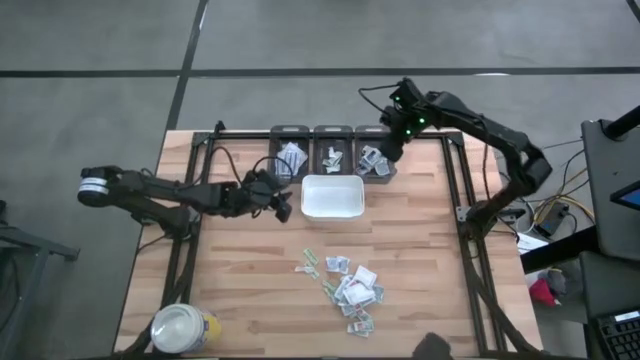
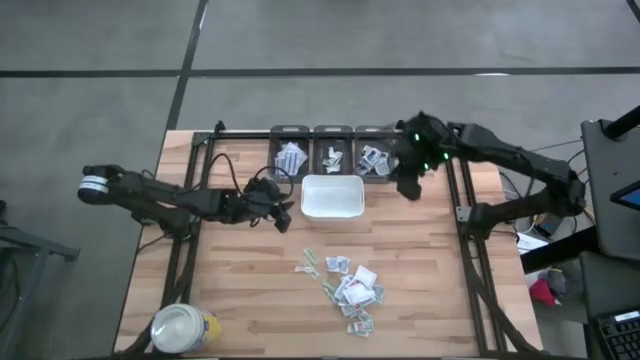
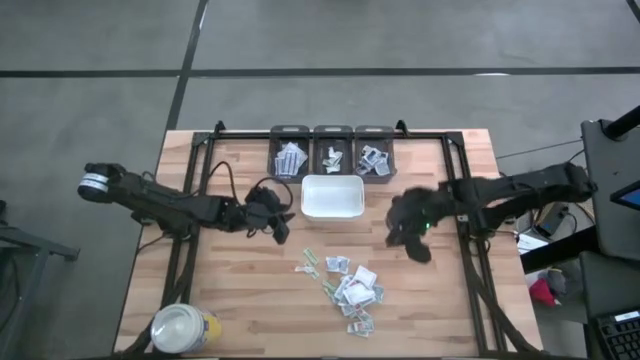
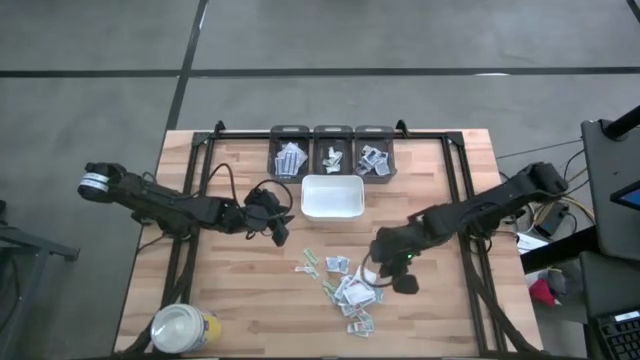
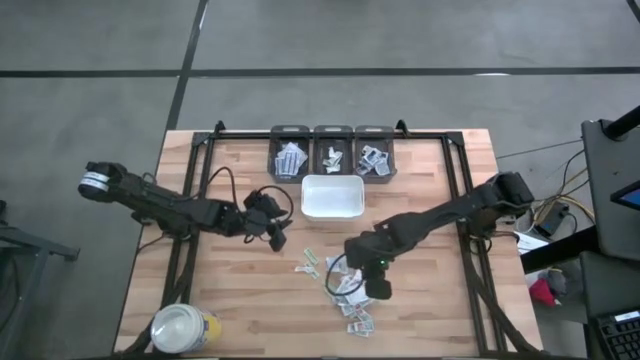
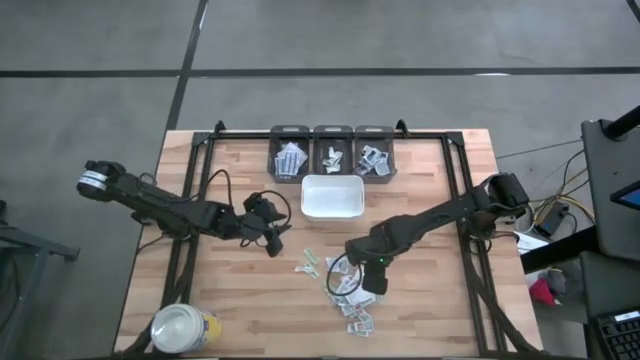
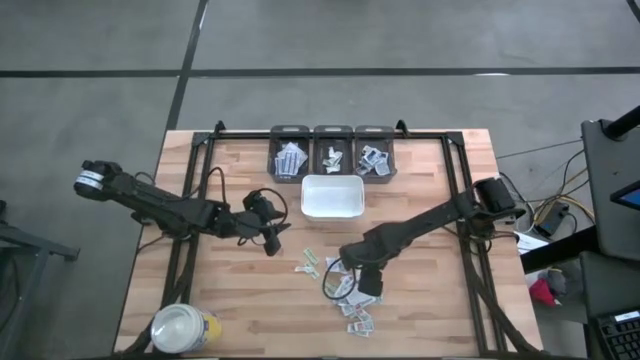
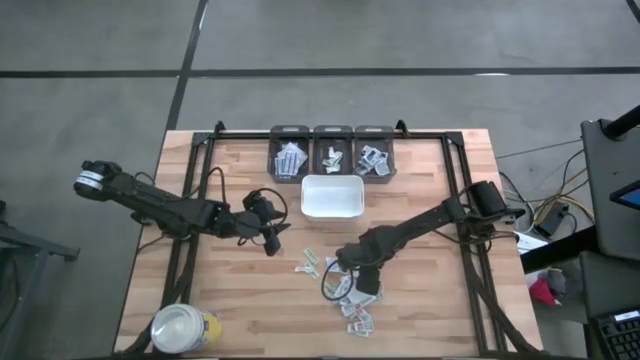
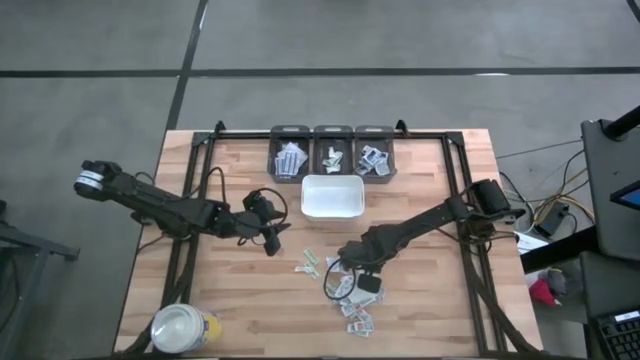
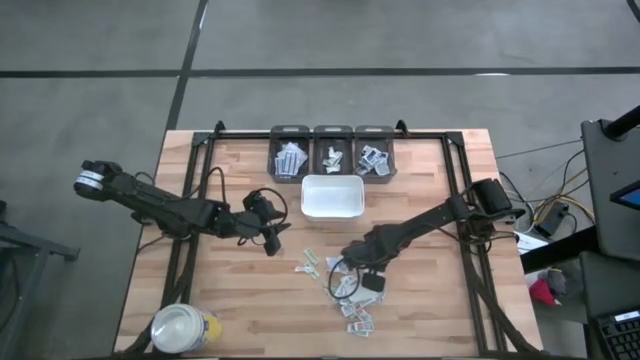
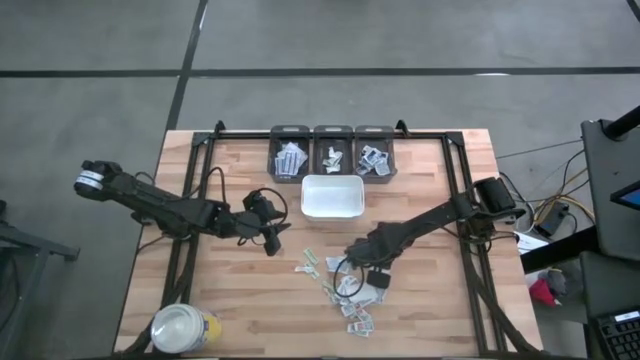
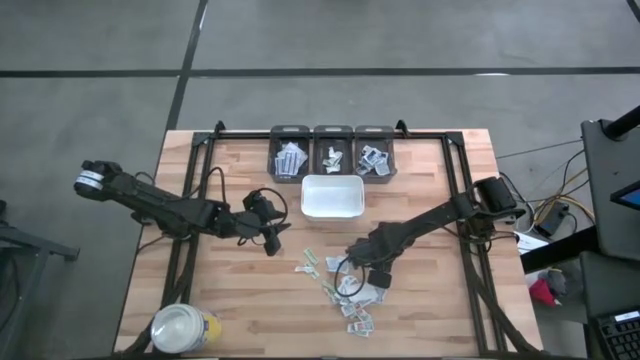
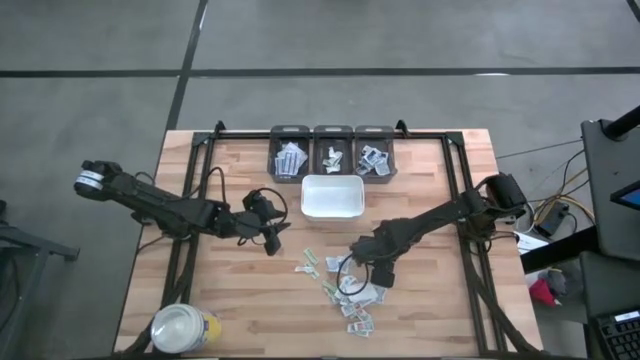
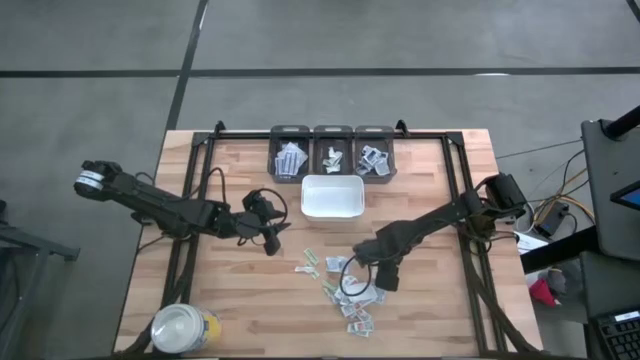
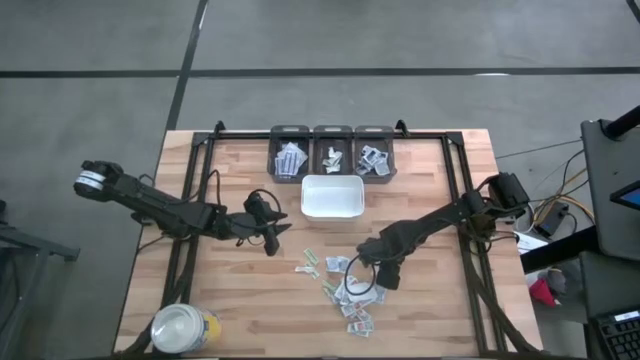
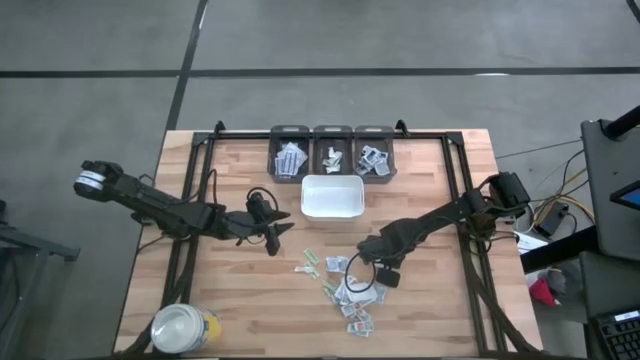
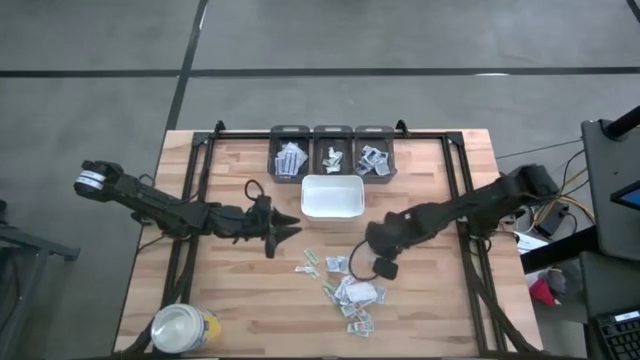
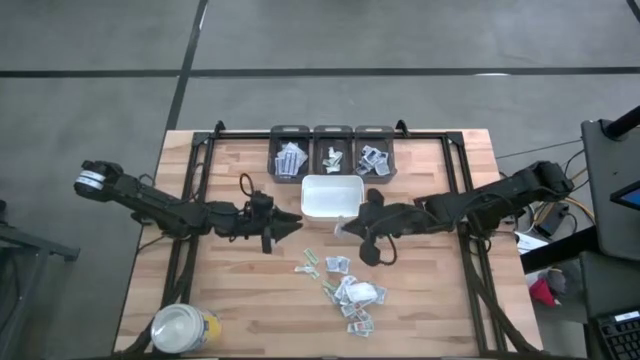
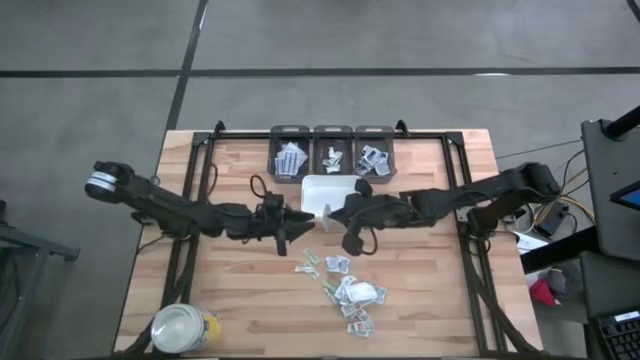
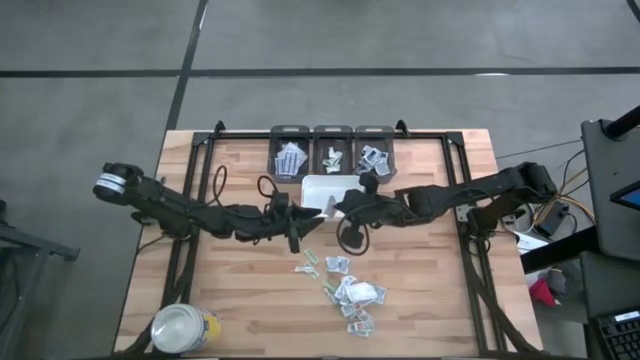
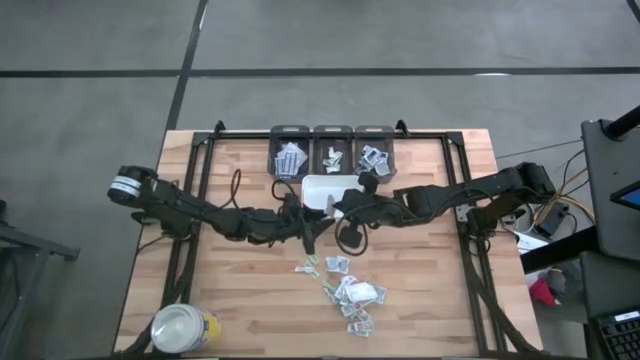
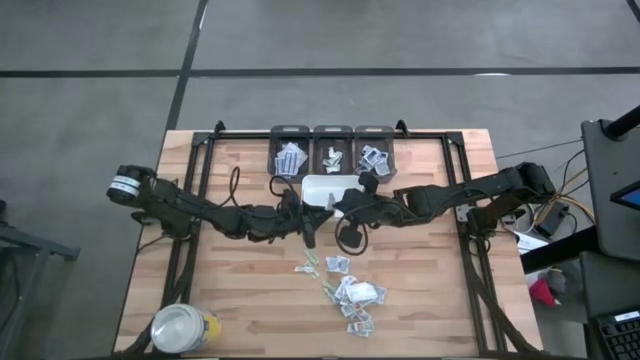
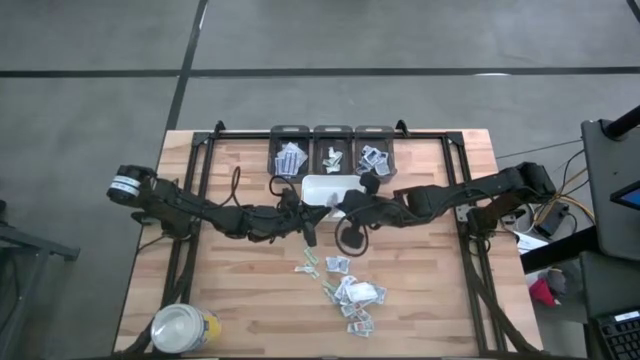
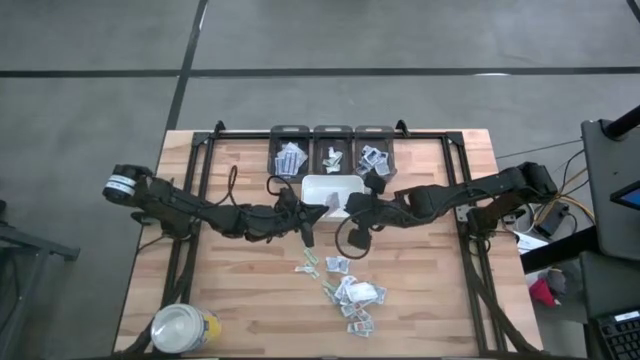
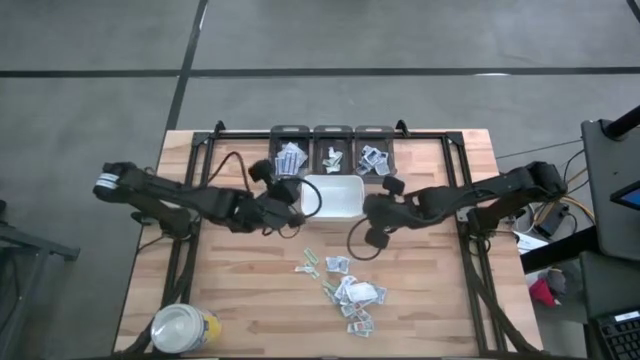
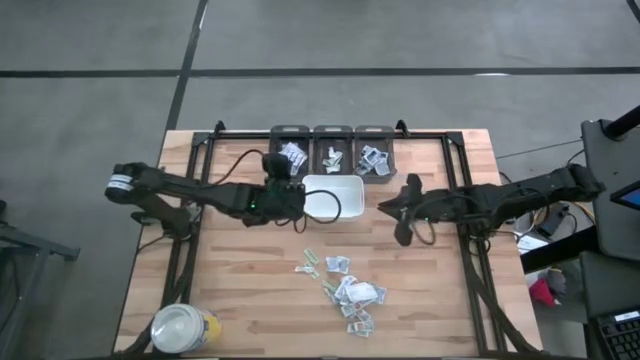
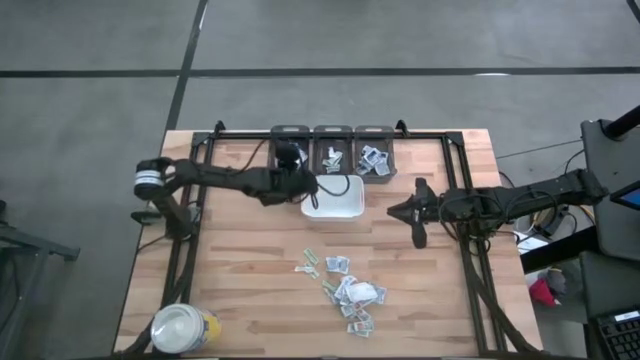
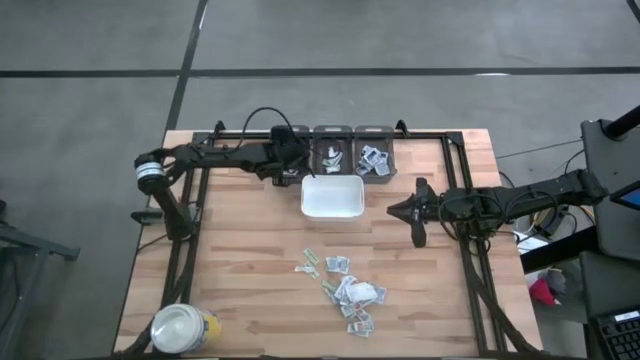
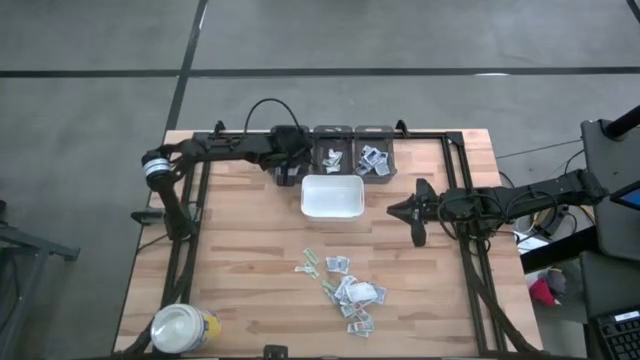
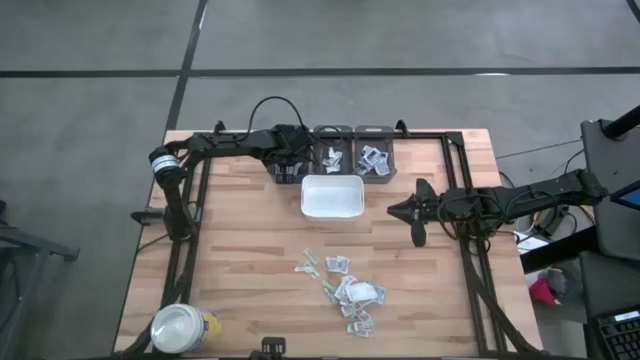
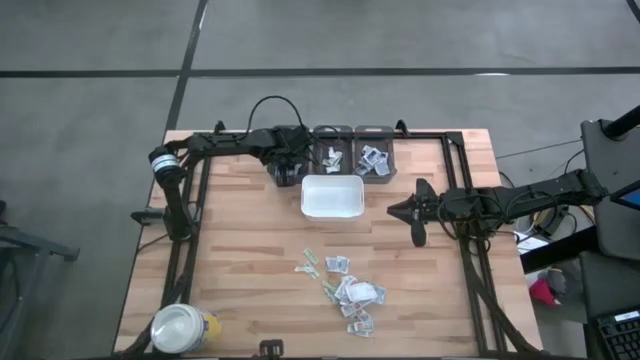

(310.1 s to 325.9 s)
Task: Pick & Place First Aid Supplies
Put the white fingertip band aid into the left black bin

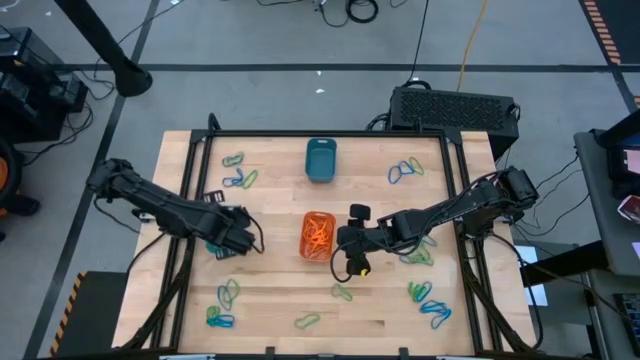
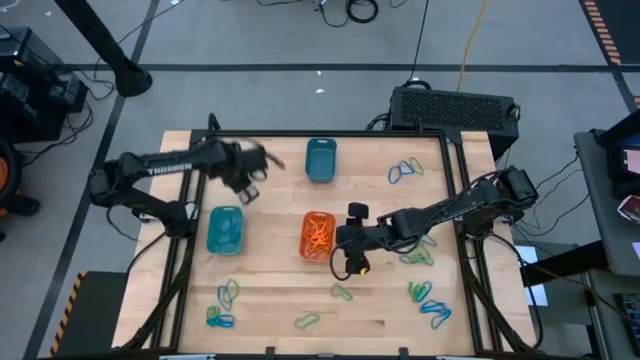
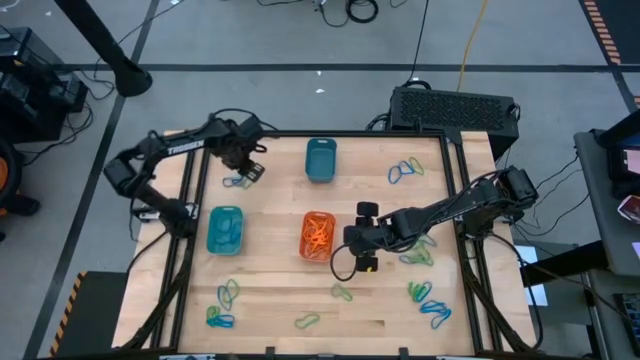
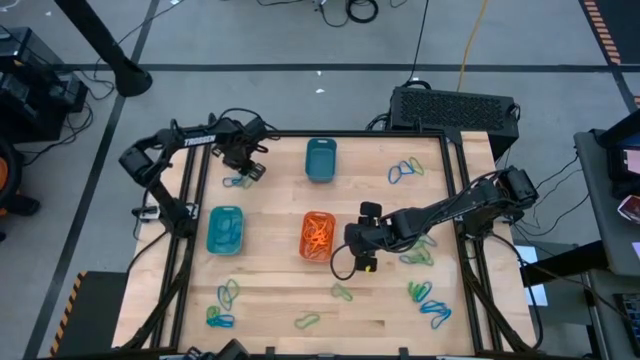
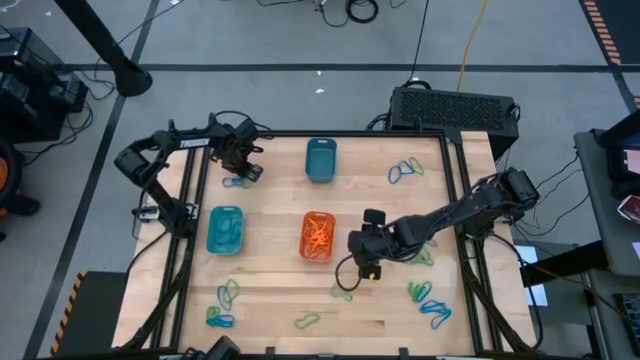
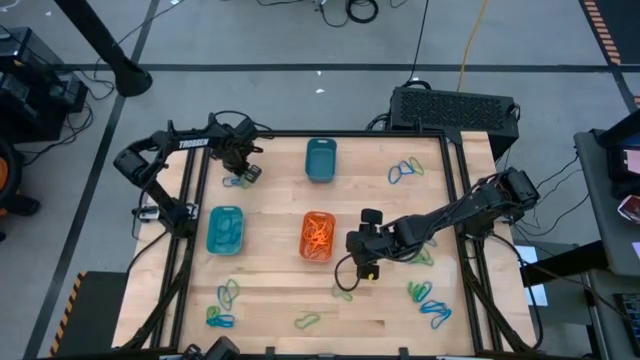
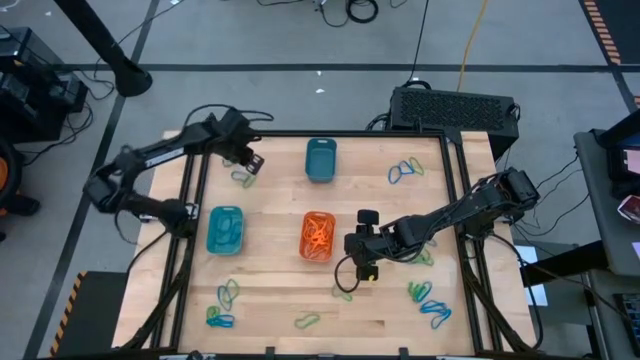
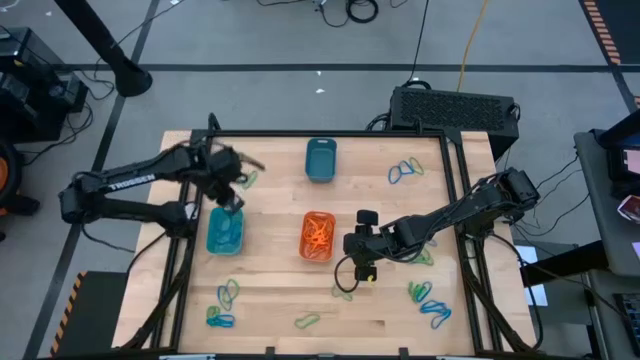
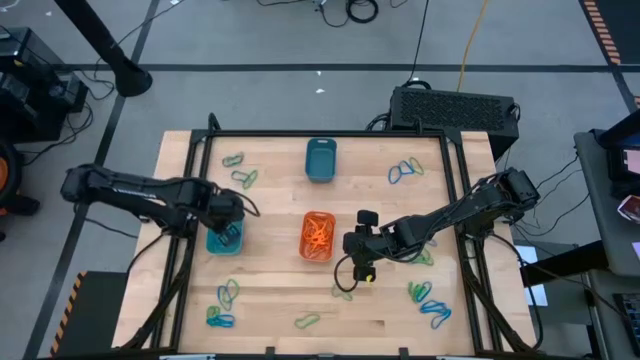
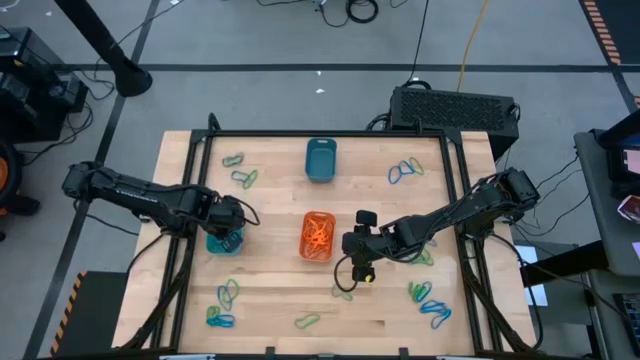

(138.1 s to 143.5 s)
Task: Sort rubber bands into baskets
Put the blue rubber band into the green bin
